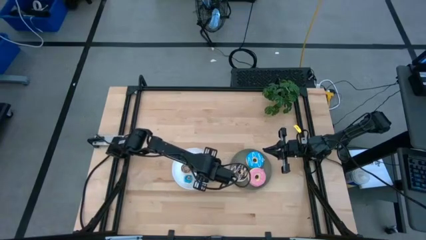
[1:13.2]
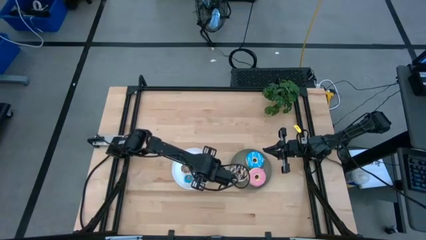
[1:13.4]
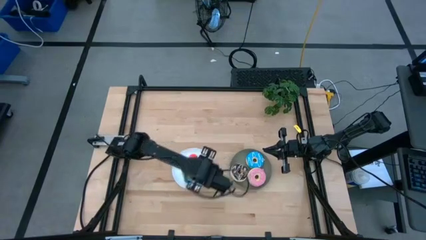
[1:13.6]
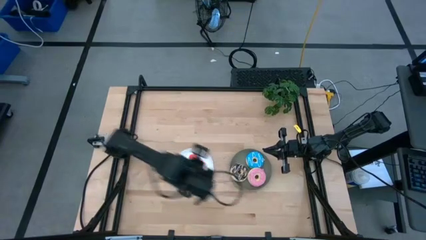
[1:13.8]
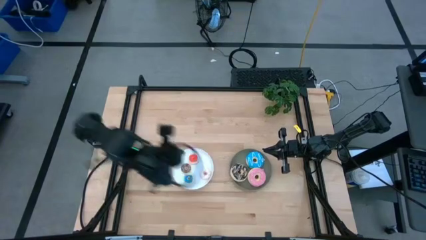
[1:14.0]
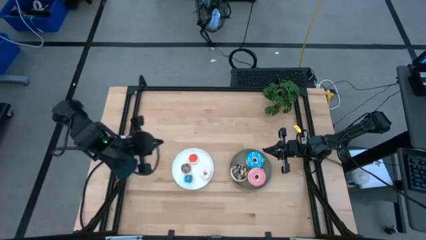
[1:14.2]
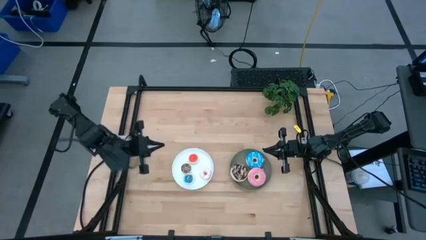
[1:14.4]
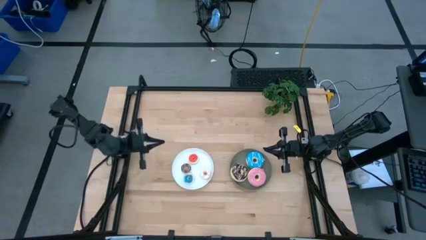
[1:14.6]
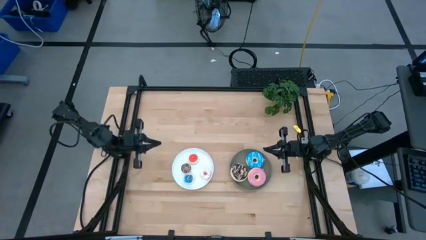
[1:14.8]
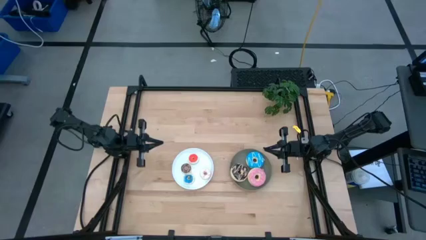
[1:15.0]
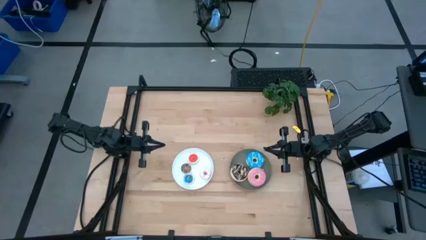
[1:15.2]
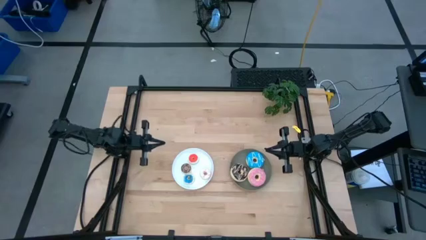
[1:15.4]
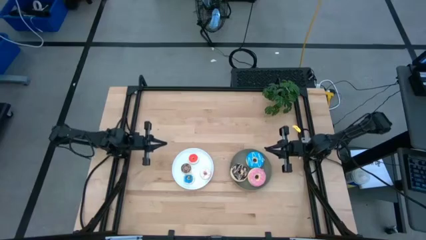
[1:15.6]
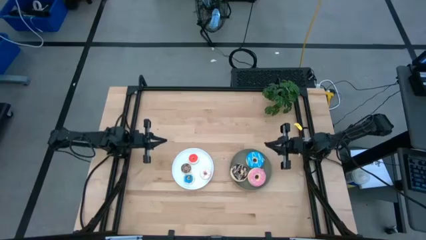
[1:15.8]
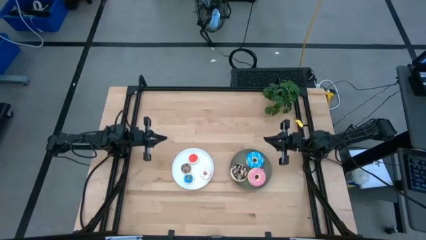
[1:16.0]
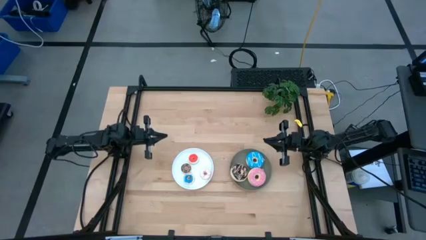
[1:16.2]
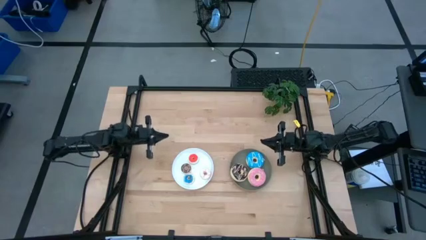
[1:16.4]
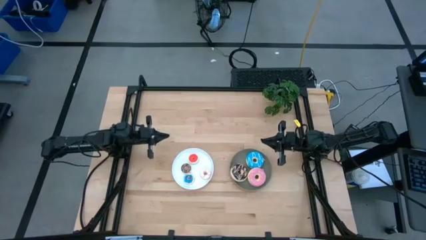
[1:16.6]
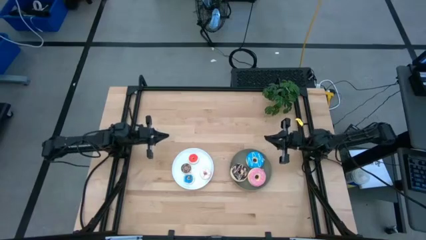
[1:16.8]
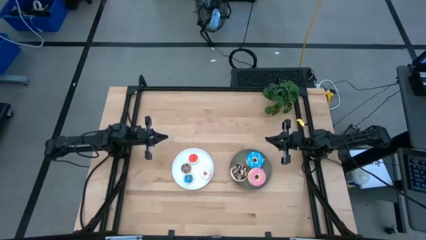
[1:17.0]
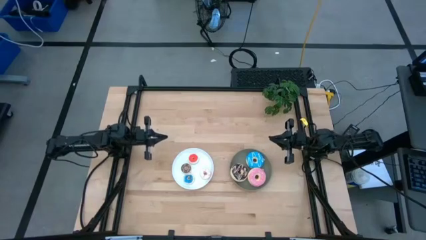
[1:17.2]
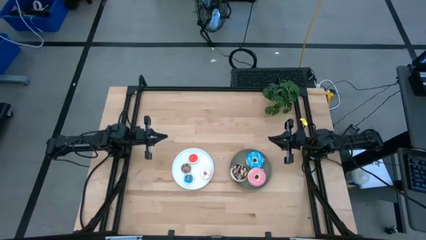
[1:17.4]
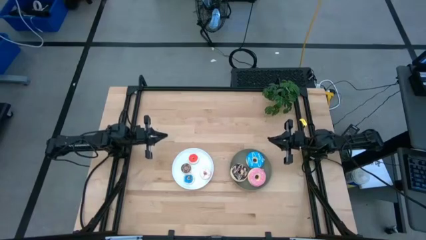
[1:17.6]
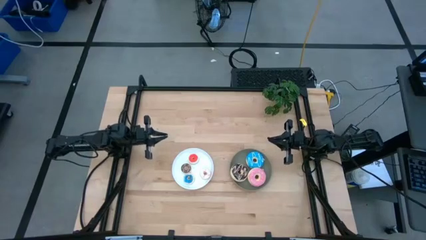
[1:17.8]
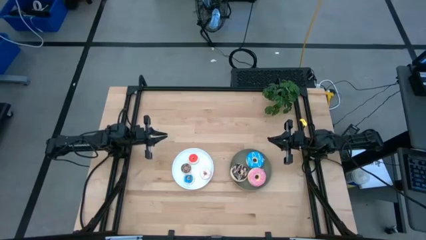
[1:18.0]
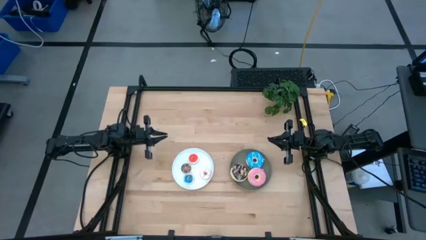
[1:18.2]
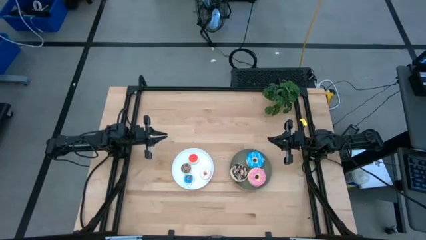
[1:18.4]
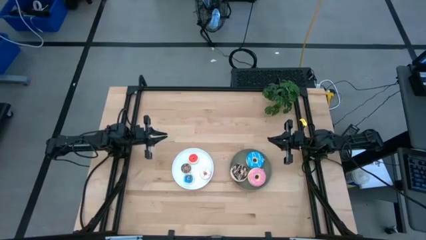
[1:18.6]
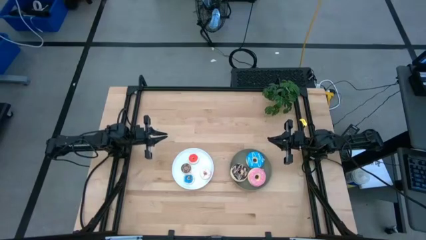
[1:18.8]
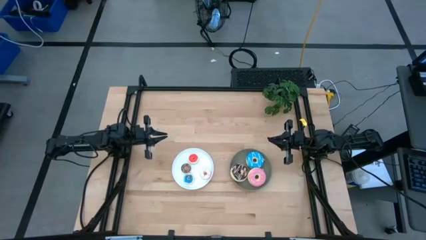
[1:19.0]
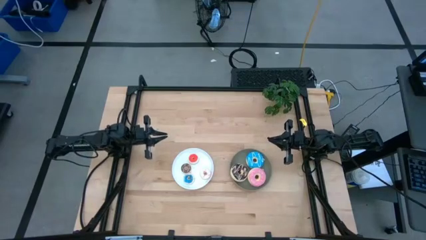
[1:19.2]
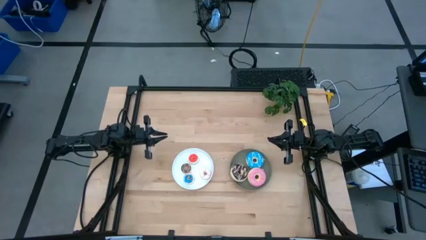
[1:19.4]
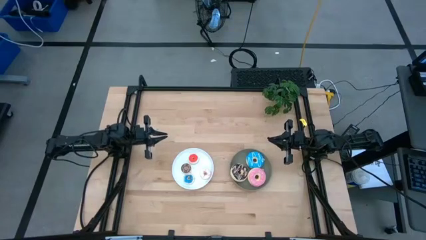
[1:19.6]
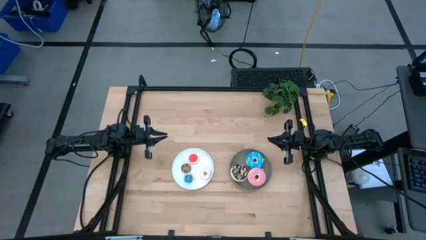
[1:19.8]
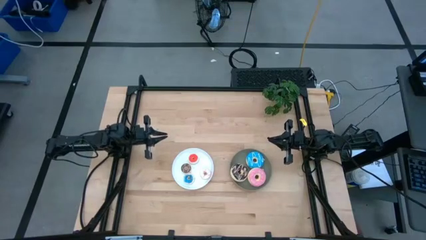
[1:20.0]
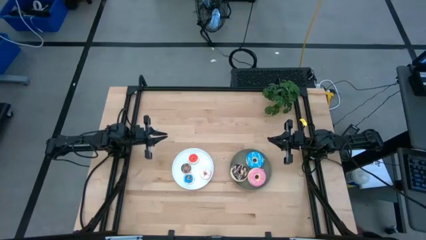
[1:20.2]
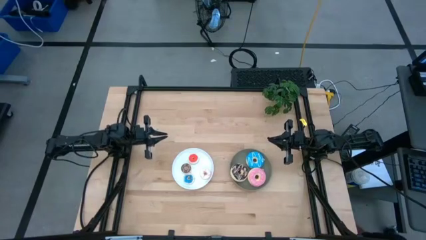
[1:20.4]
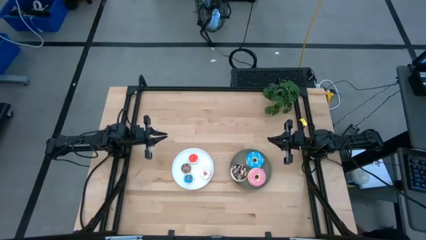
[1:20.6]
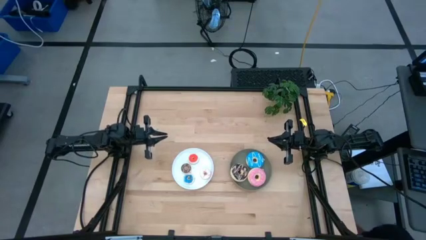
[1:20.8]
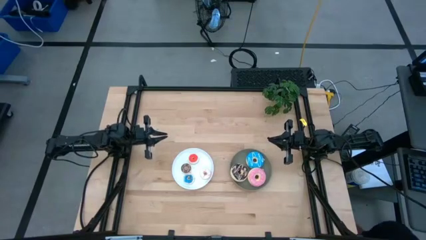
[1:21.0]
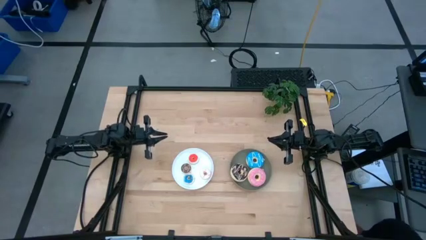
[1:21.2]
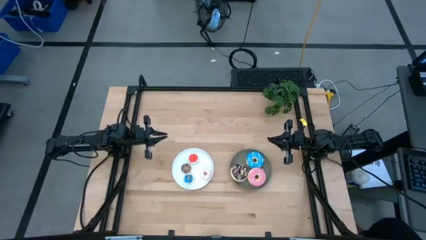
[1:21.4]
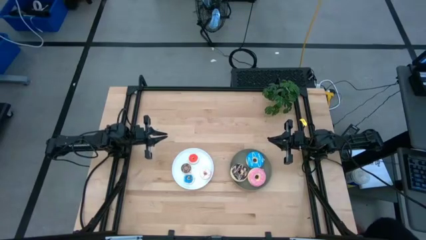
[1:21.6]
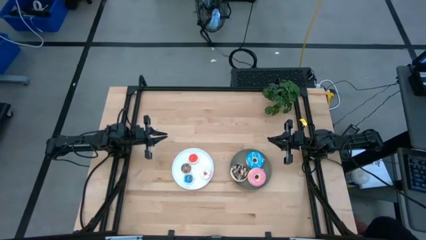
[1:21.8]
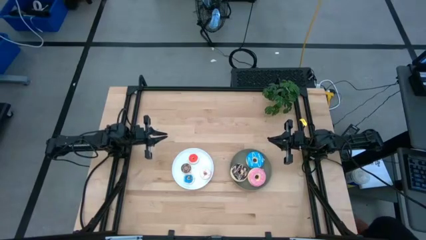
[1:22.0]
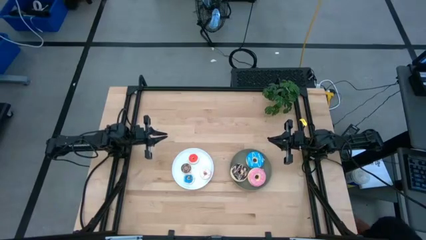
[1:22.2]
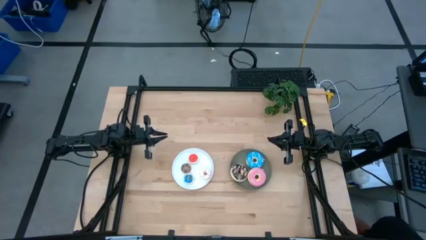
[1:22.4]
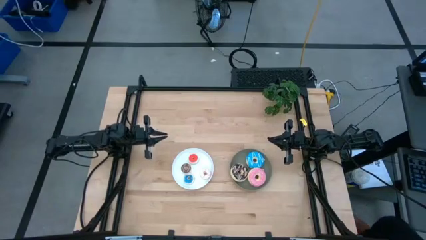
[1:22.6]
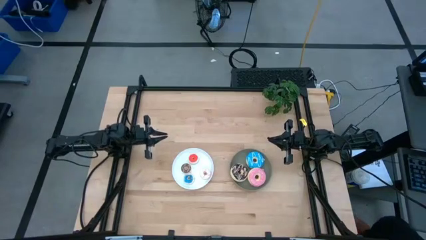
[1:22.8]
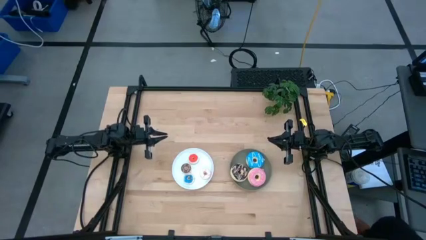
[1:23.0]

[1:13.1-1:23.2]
Task: Pick & Place donuts
Return to Home Position

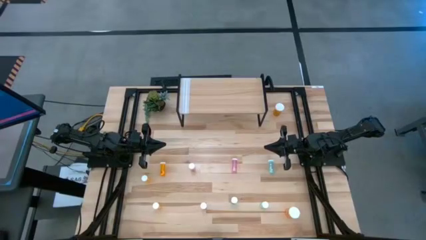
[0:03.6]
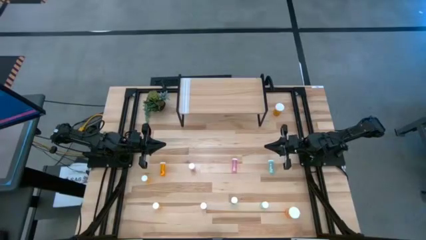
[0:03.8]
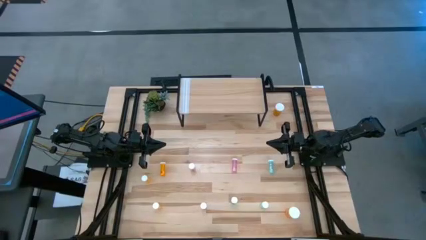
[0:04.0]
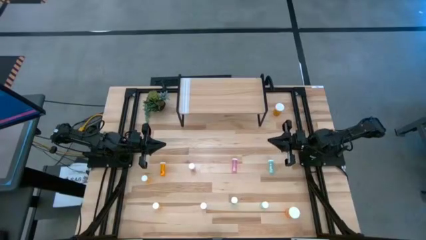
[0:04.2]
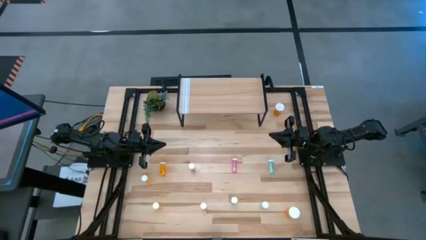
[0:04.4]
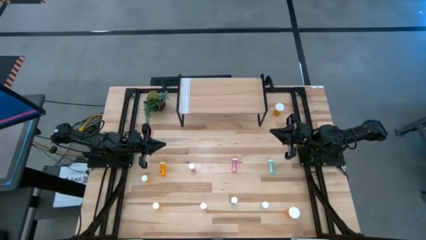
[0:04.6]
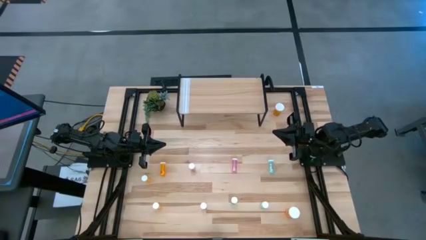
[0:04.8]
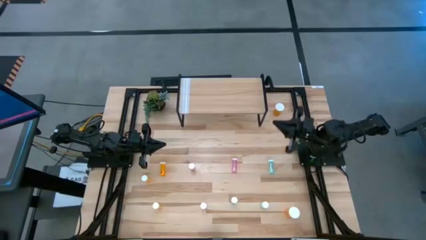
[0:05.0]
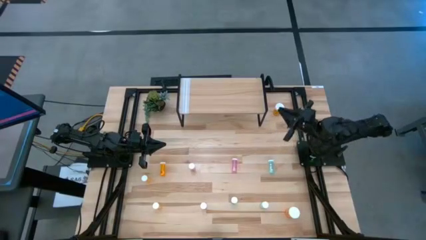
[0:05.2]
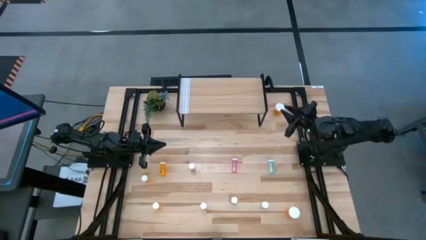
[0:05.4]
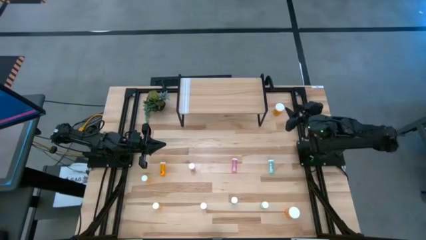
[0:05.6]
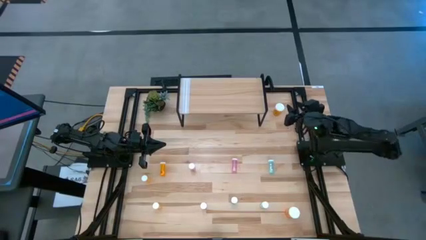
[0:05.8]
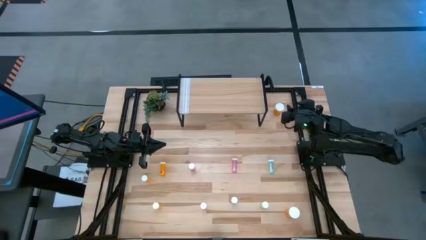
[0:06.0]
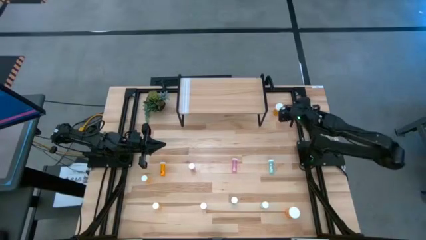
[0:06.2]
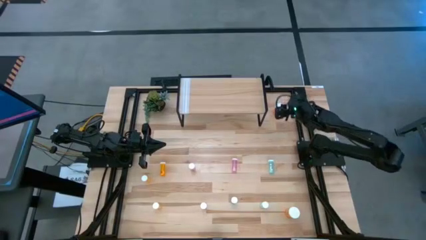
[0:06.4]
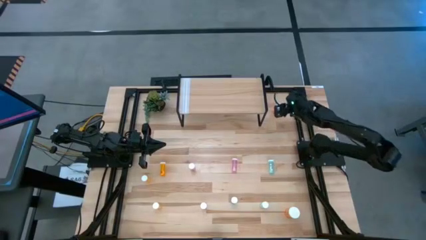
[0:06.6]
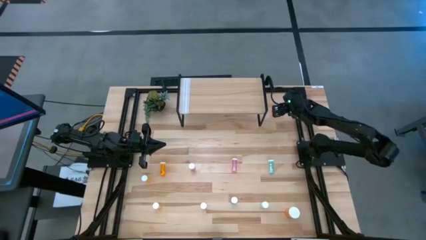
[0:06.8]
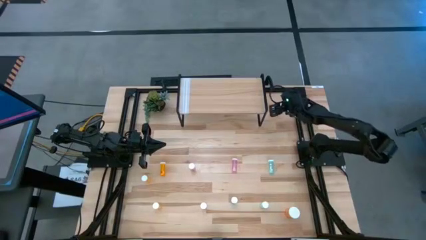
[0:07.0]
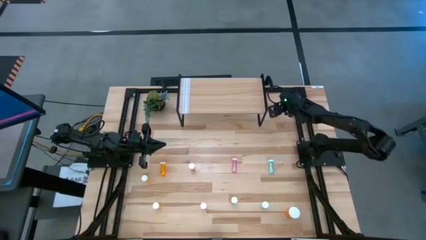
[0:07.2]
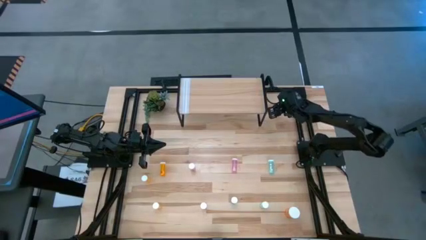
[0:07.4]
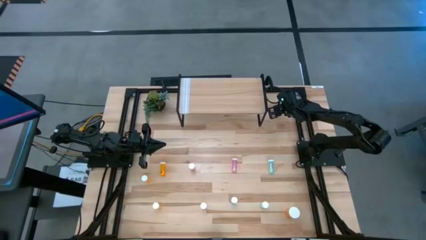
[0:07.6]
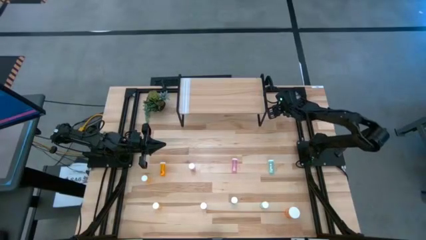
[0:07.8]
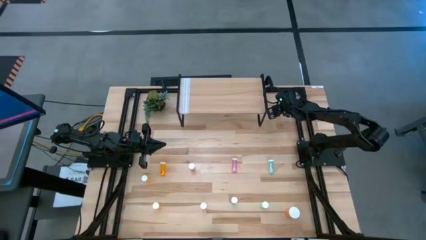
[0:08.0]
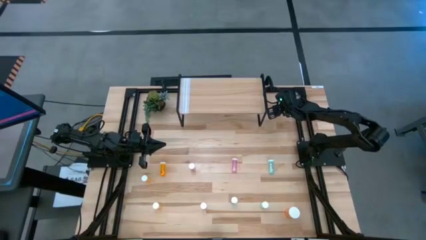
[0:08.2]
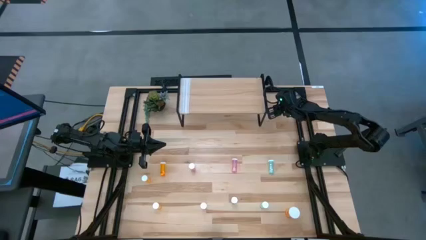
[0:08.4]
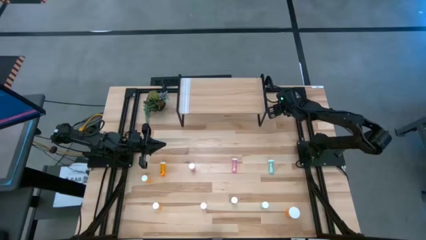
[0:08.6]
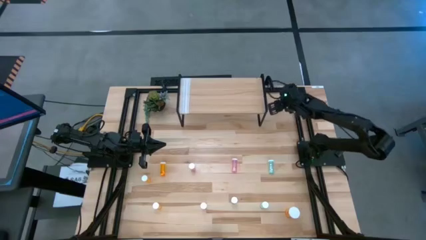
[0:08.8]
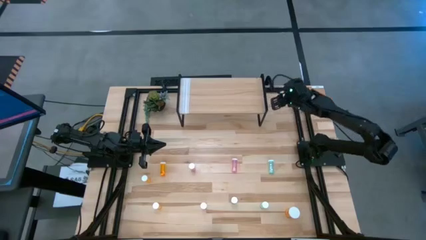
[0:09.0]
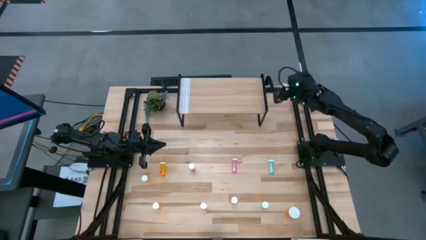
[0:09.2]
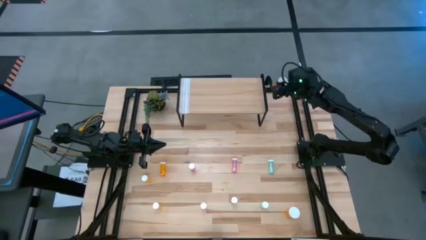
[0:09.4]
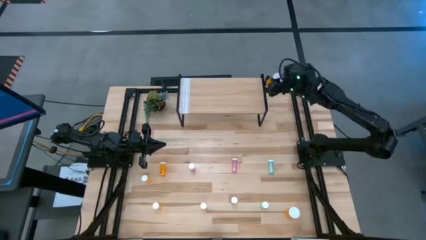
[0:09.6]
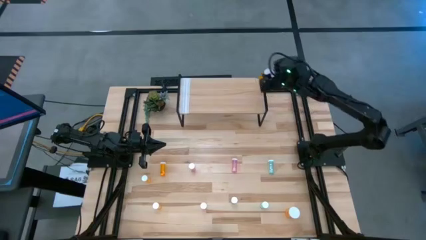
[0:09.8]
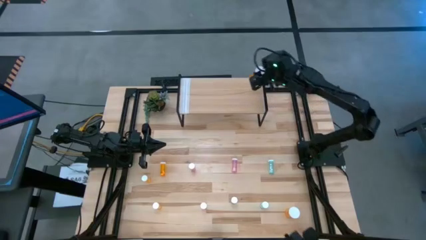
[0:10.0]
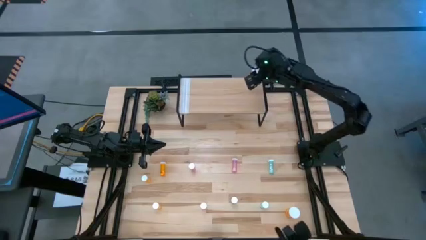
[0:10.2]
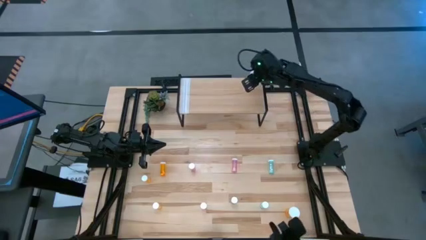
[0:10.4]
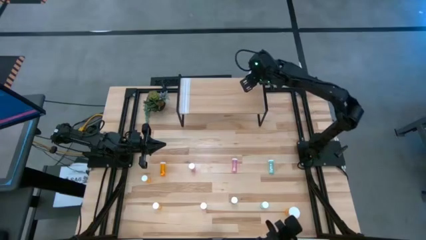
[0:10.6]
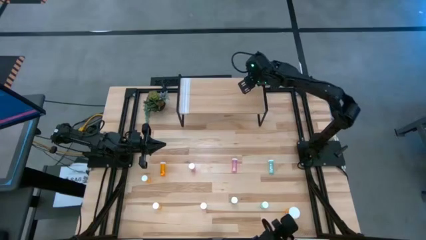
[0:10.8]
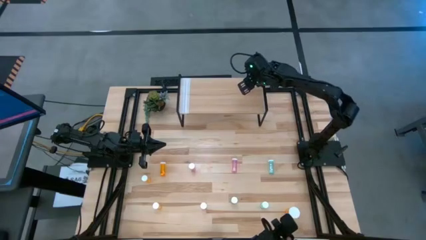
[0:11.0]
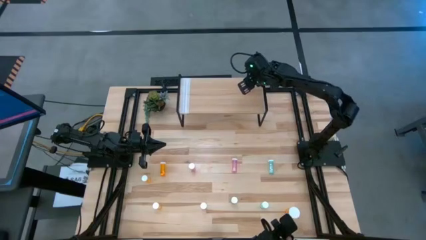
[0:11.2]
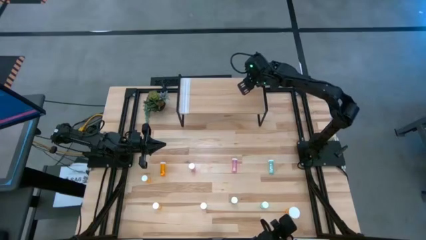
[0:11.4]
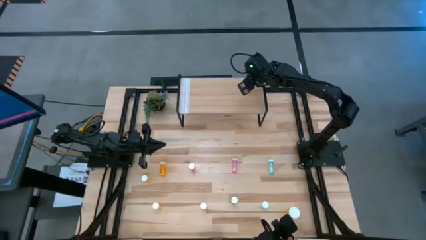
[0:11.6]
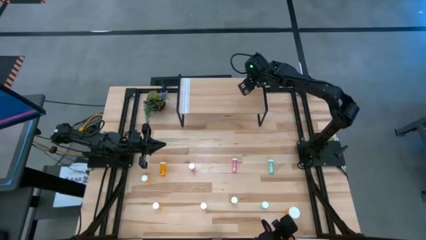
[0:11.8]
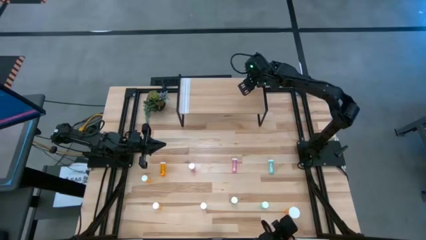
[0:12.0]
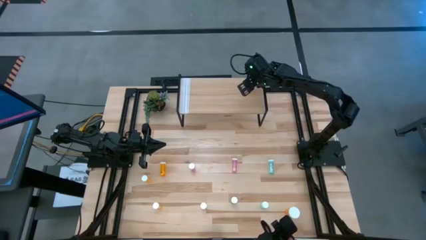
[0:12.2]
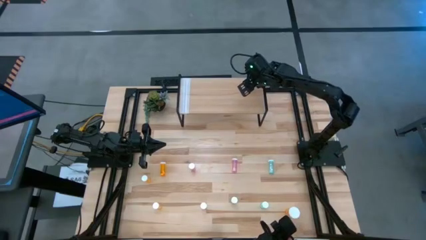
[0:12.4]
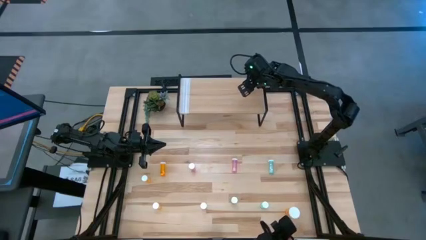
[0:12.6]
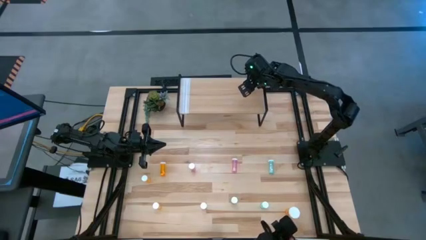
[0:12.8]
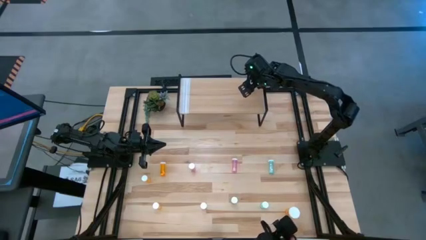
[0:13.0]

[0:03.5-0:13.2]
Task: Pick and place medicine bottles onto shelf by color
Put the top large orange pill bottle on the shelf
